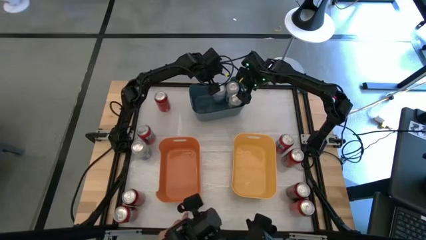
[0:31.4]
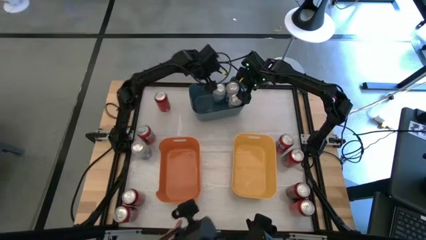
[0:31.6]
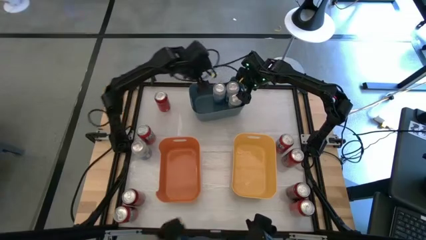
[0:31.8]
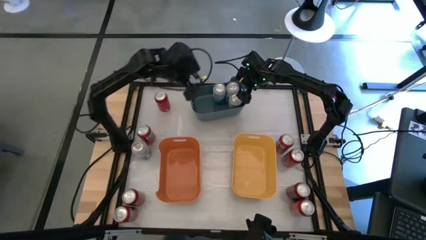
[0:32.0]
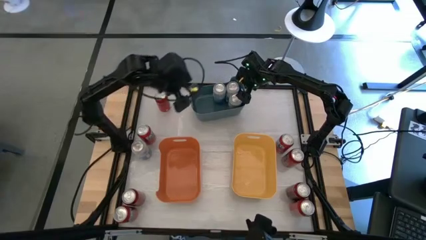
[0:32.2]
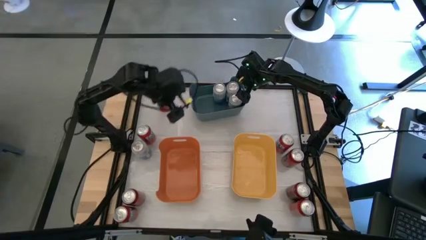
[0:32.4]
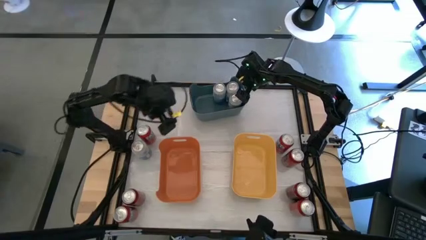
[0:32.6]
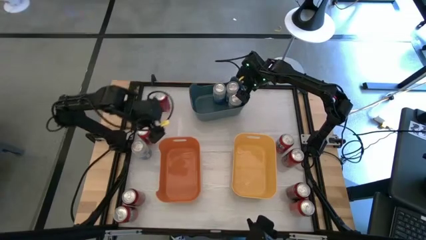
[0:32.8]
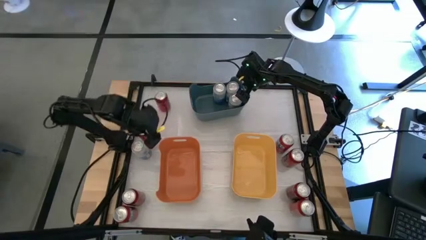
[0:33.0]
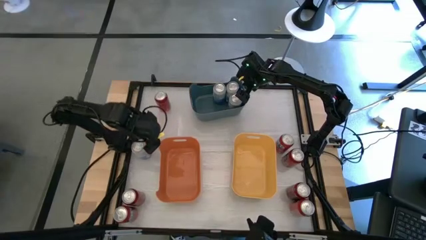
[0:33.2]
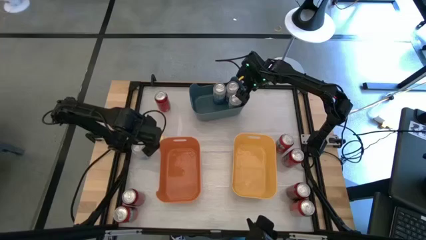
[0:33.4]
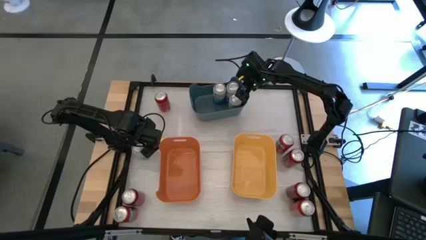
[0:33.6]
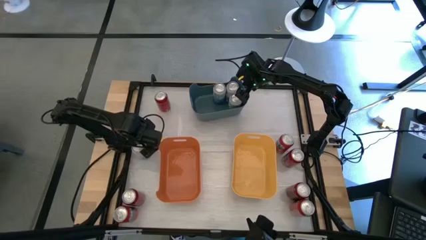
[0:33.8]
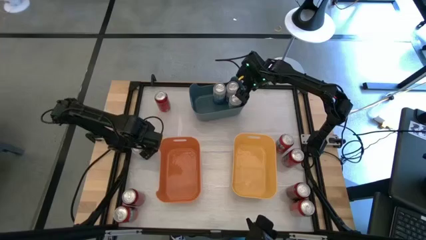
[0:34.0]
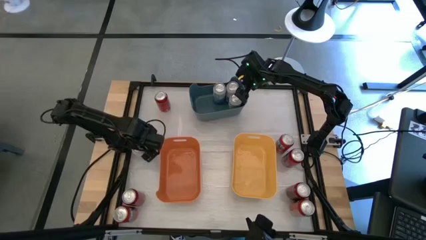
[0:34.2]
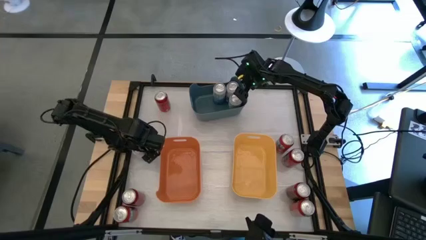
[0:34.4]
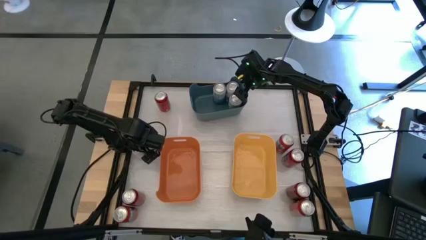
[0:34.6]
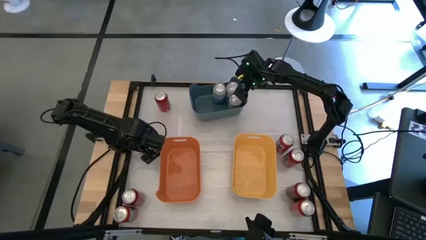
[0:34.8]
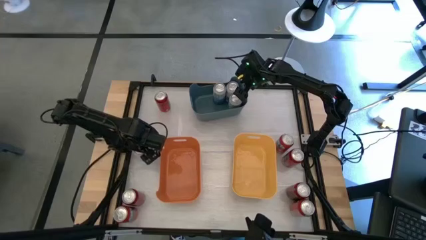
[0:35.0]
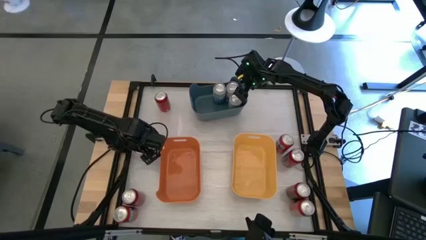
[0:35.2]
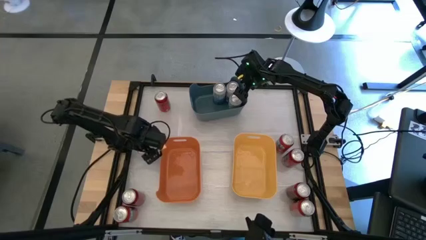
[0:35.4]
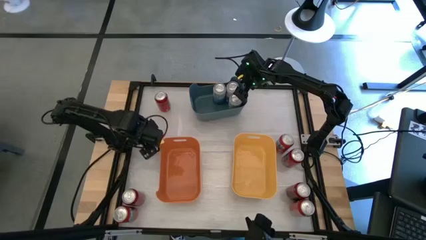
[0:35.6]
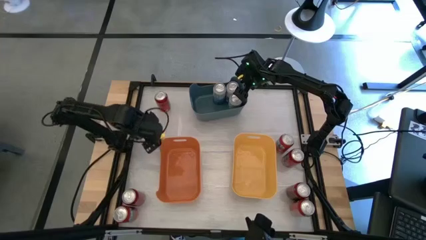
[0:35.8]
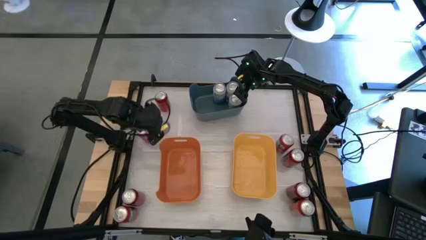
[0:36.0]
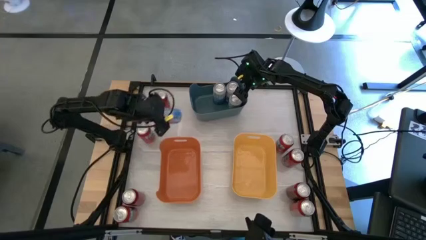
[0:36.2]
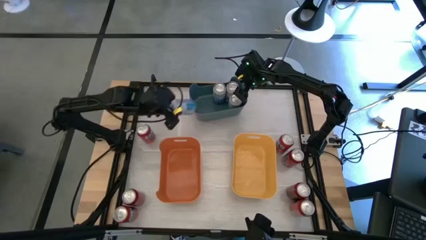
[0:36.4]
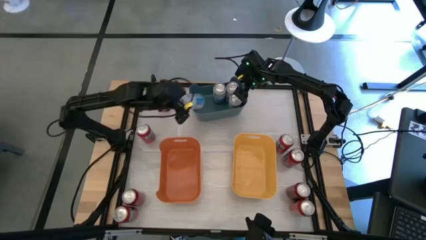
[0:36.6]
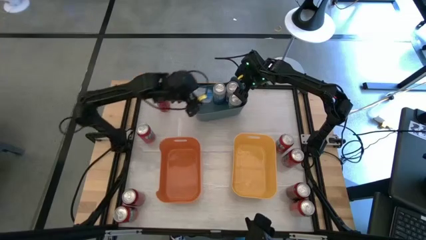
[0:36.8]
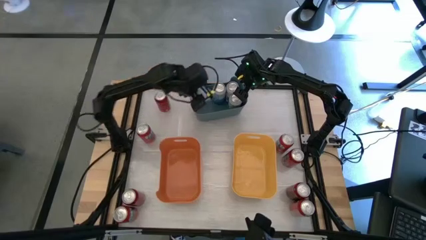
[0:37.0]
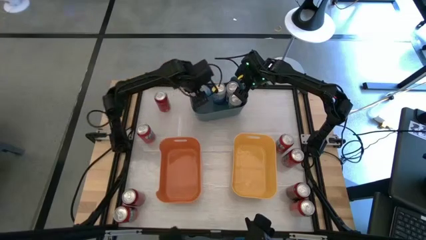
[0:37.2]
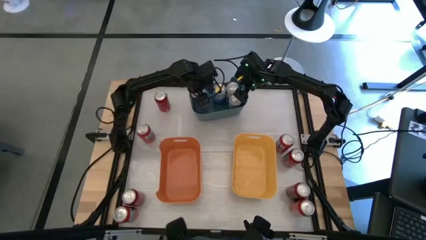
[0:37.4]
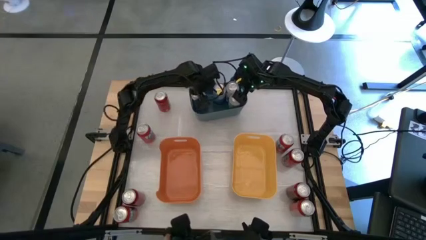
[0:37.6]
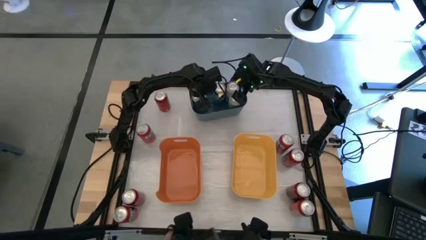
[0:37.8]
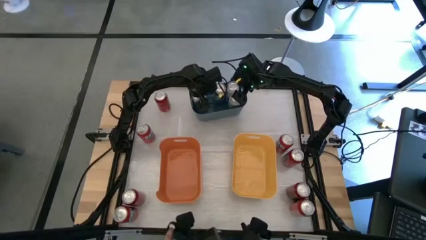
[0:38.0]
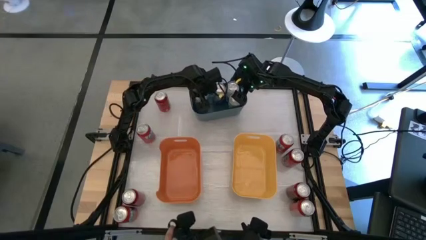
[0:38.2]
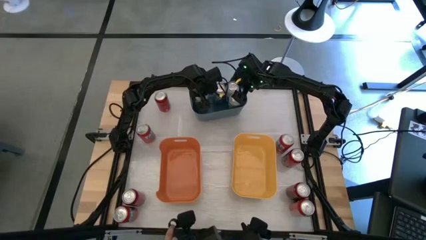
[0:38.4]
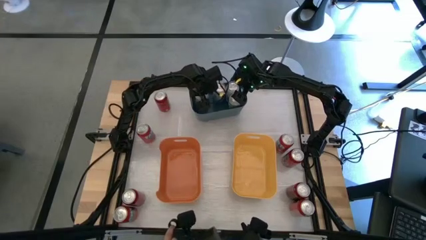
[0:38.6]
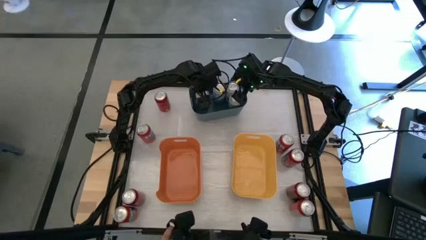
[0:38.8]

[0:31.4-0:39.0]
Task: Sort soda cans
Put the blue-white soda can into the green bin

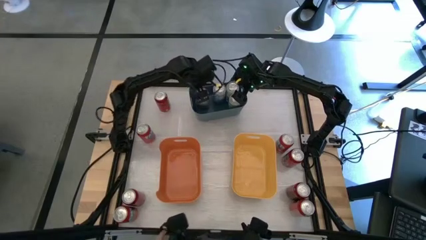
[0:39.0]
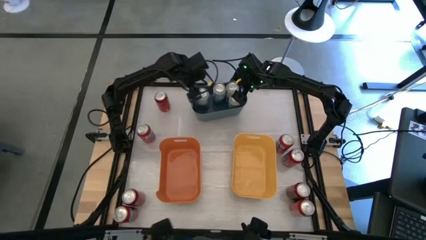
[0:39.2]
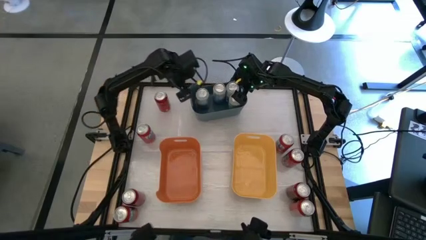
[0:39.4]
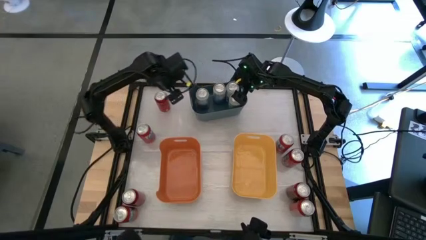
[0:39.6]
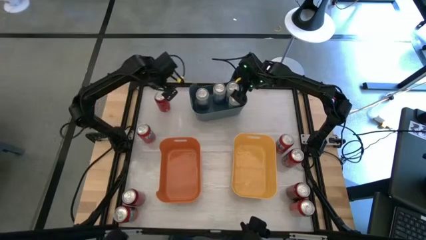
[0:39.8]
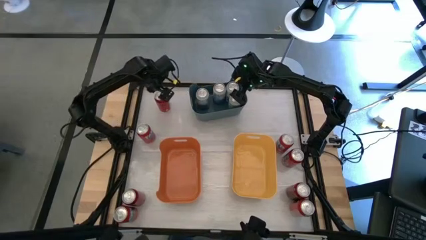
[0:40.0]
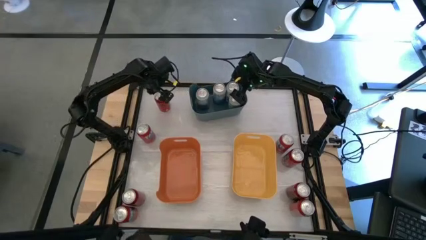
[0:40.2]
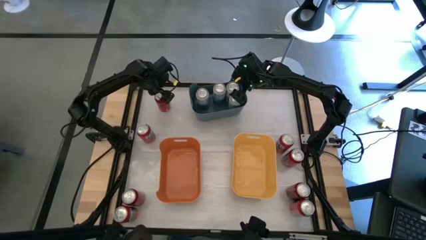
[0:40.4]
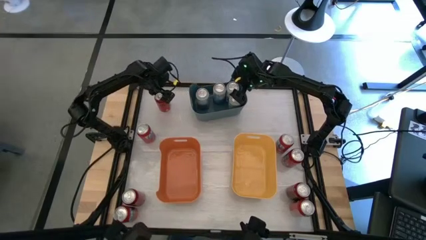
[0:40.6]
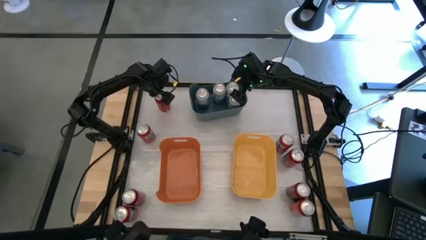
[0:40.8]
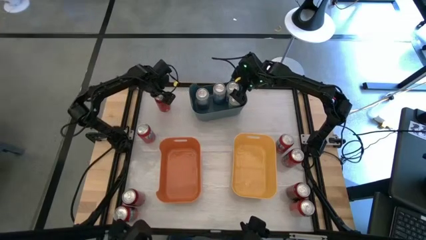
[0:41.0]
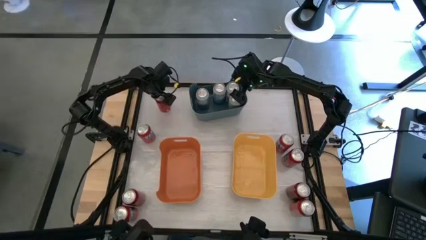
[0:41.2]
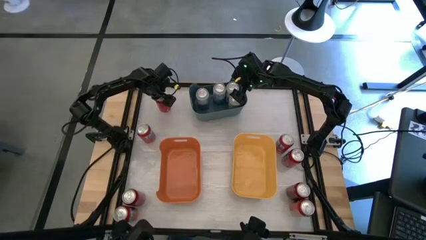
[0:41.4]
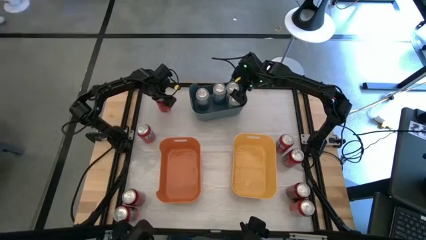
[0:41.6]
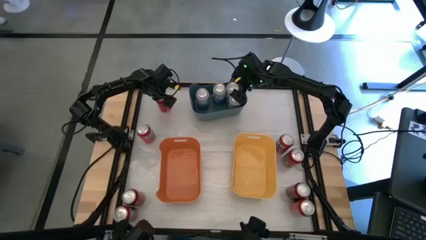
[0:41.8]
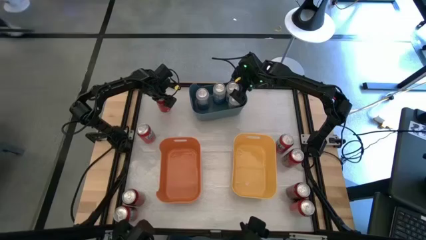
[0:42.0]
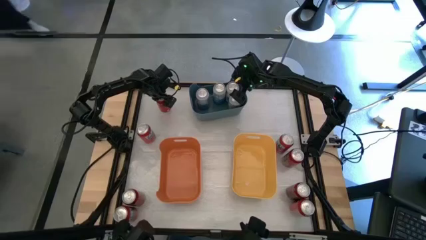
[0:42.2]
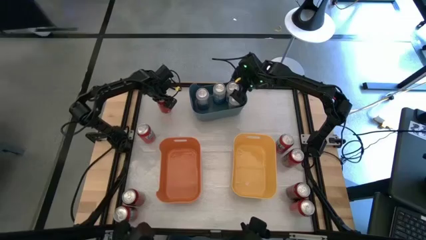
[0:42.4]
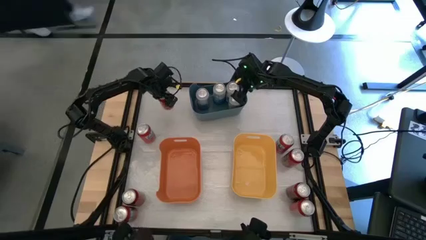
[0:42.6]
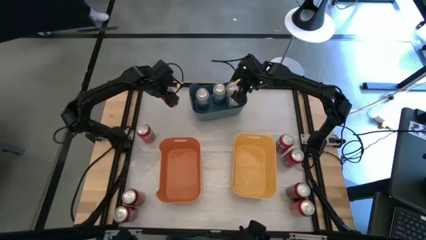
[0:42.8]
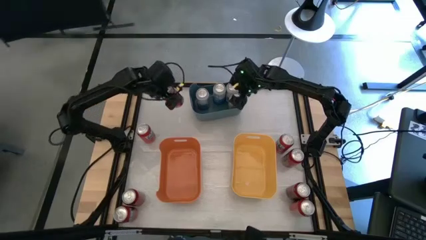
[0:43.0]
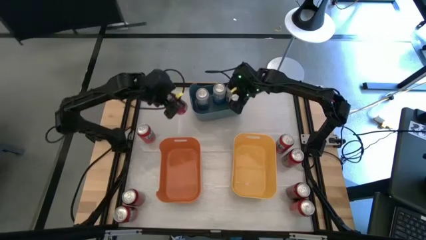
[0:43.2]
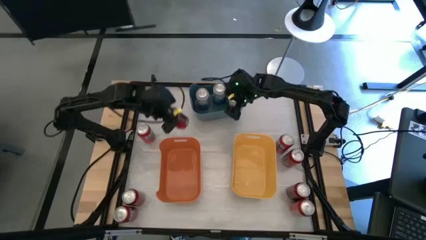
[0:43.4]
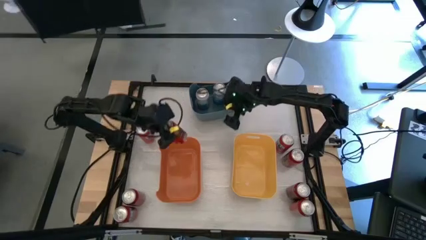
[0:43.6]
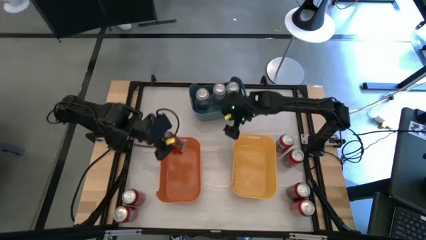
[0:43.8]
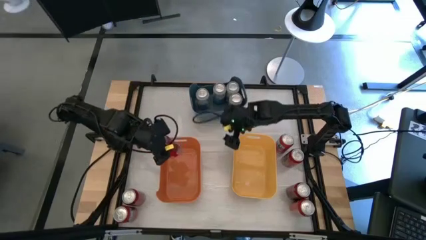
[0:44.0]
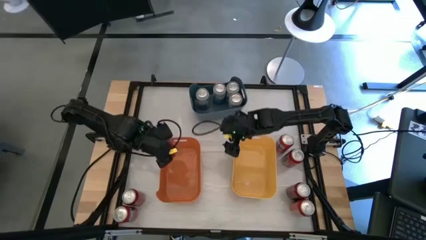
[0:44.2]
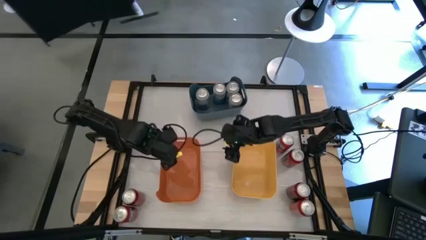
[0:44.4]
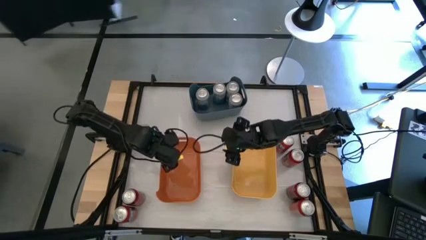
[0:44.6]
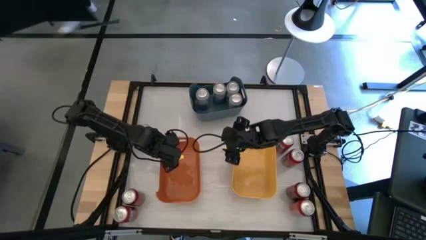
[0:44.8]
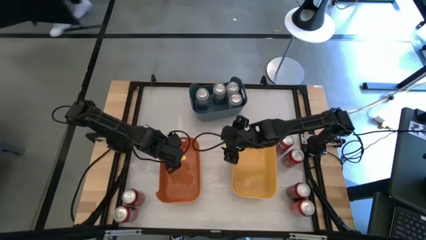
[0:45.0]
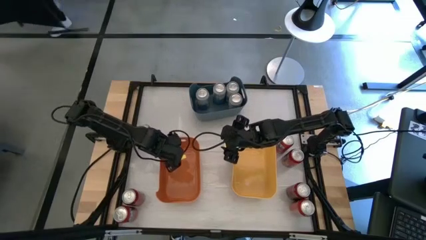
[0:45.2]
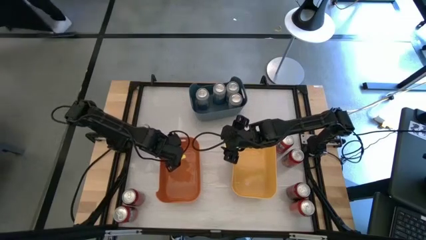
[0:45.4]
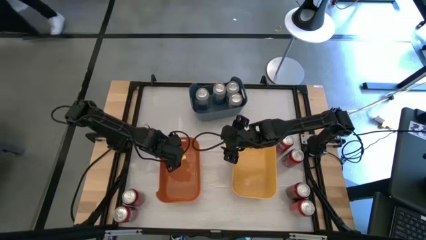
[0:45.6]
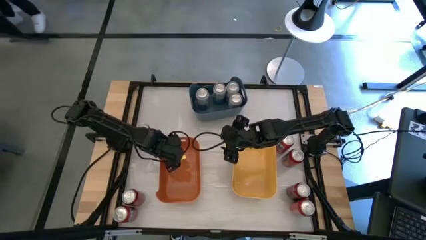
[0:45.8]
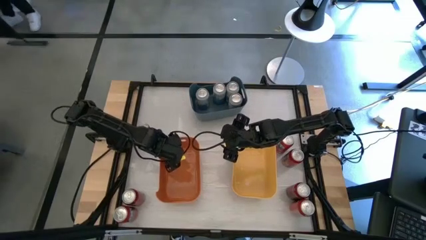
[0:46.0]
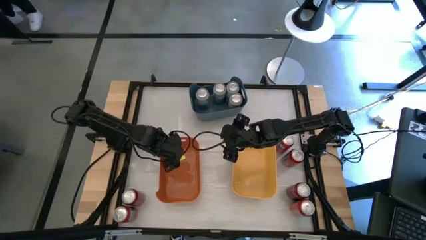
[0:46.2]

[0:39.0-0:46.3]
Put the top left red-black soda can into the orange bin
